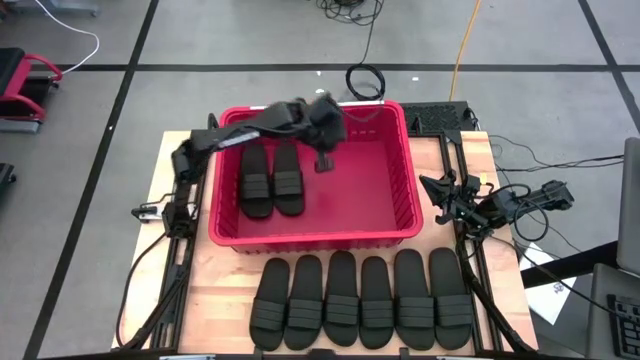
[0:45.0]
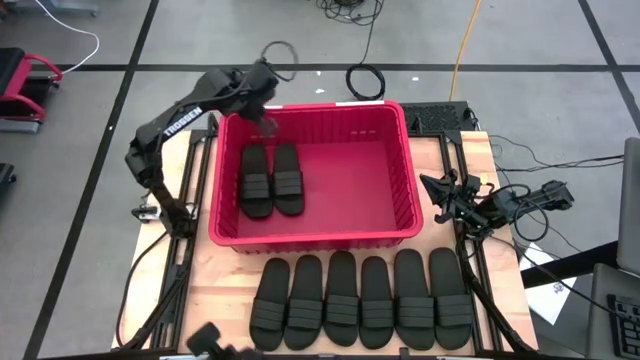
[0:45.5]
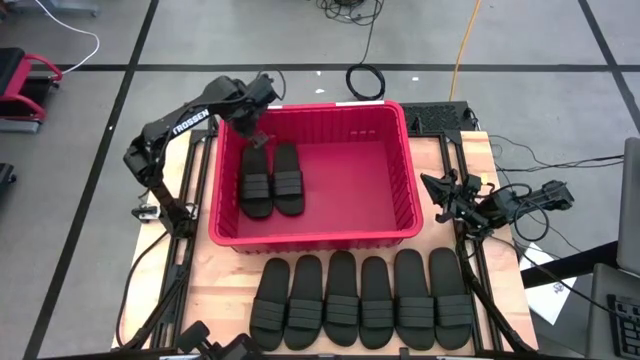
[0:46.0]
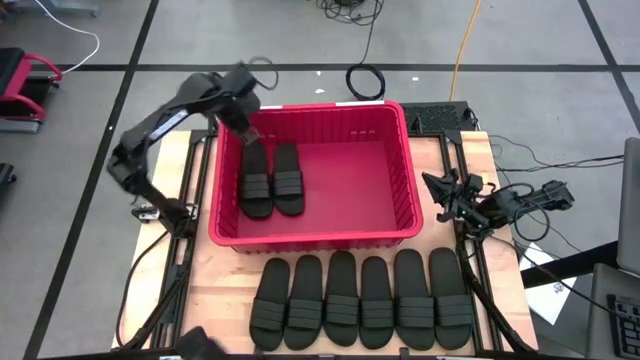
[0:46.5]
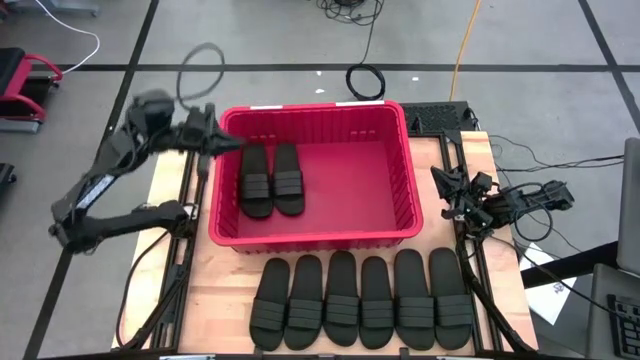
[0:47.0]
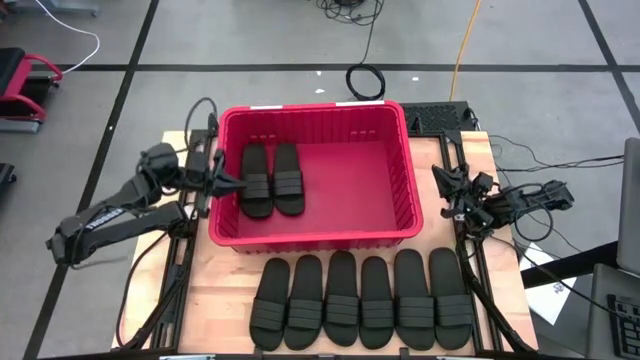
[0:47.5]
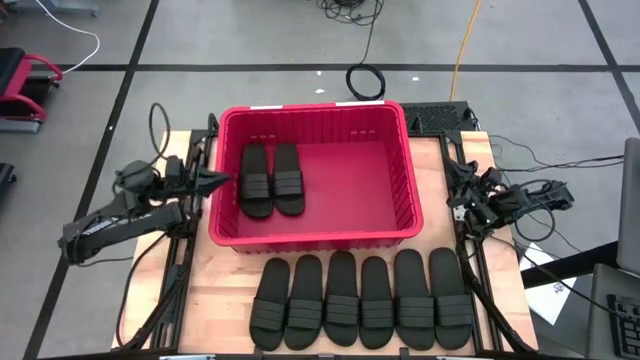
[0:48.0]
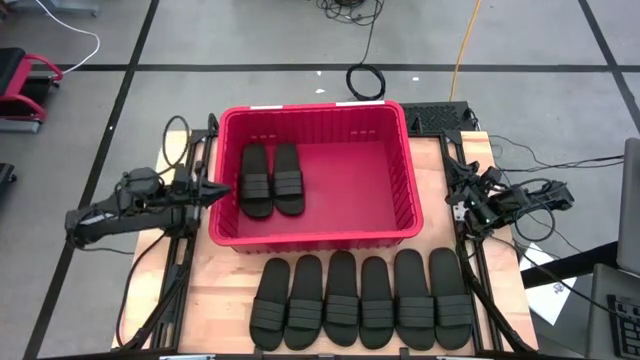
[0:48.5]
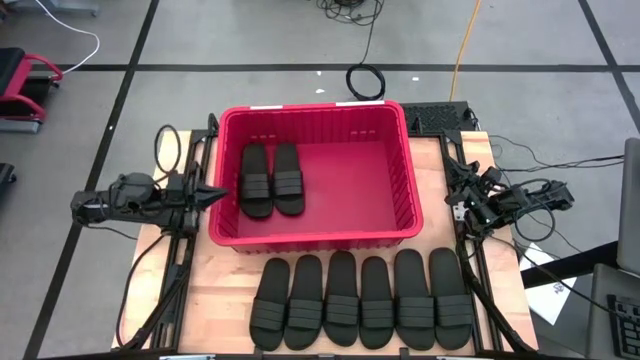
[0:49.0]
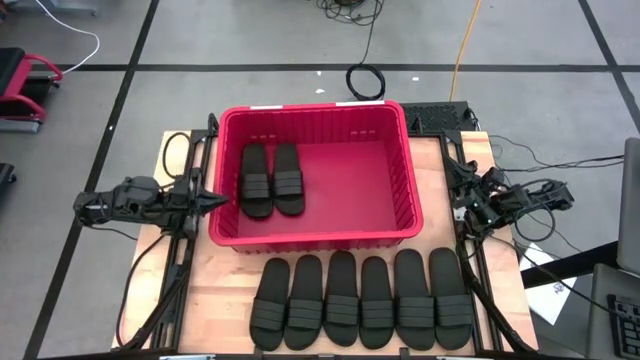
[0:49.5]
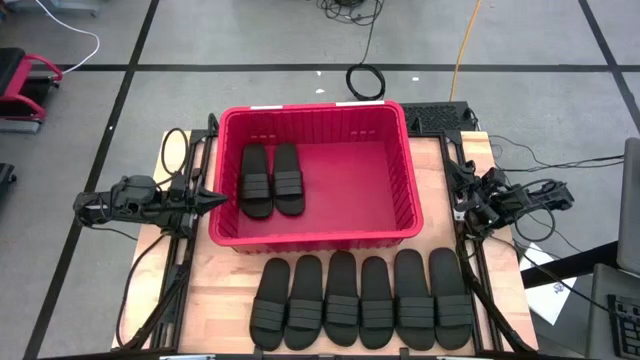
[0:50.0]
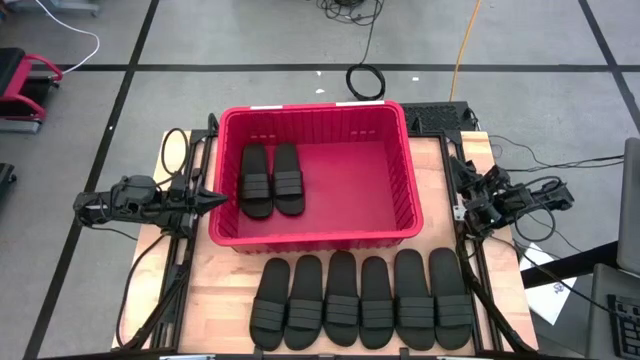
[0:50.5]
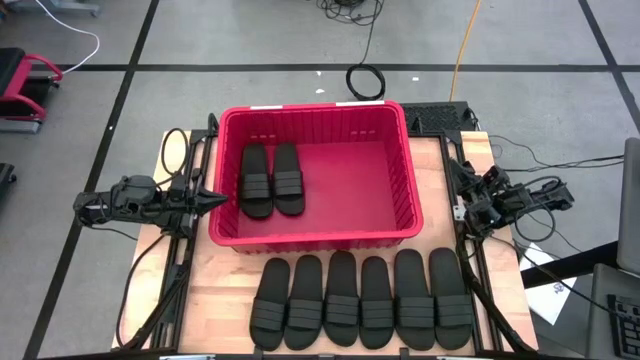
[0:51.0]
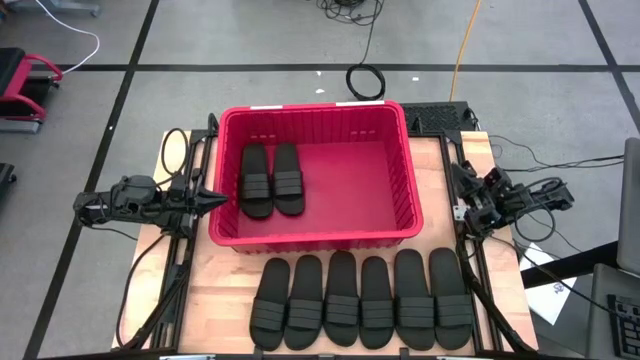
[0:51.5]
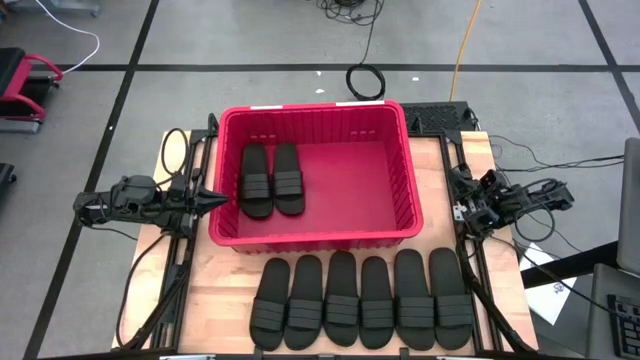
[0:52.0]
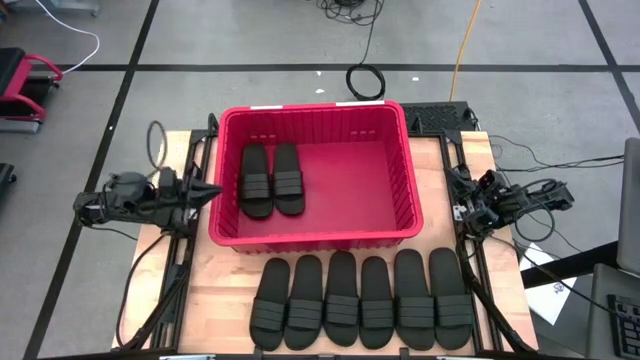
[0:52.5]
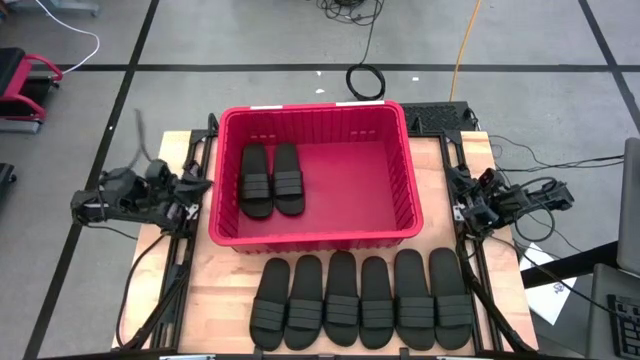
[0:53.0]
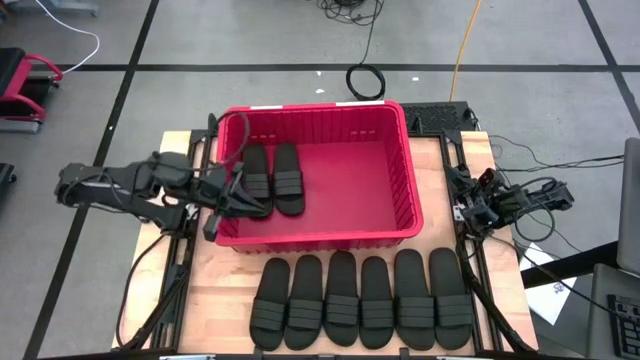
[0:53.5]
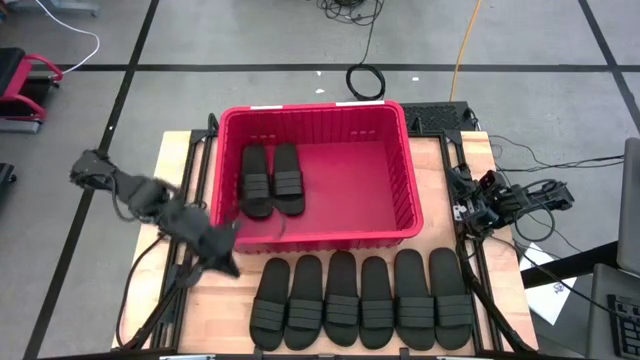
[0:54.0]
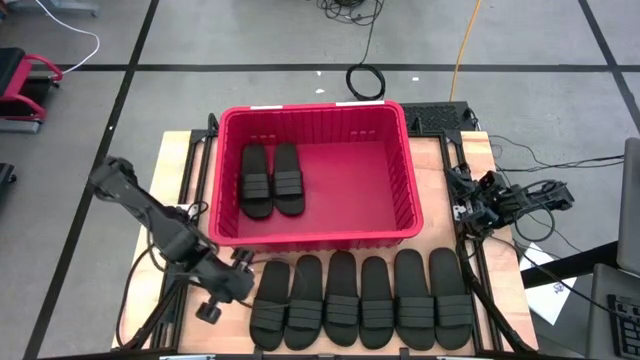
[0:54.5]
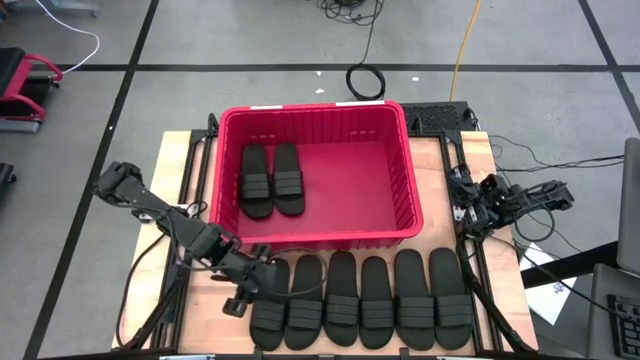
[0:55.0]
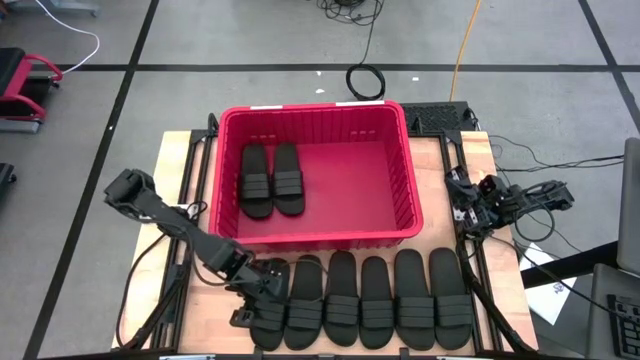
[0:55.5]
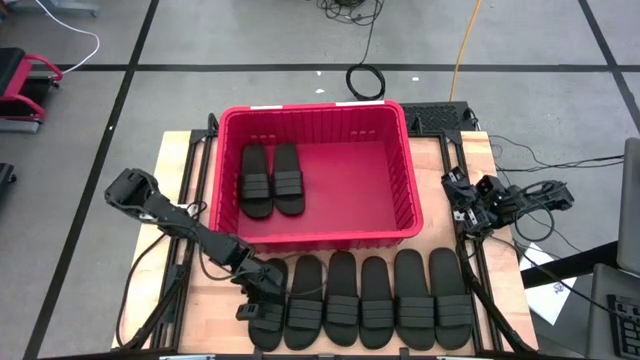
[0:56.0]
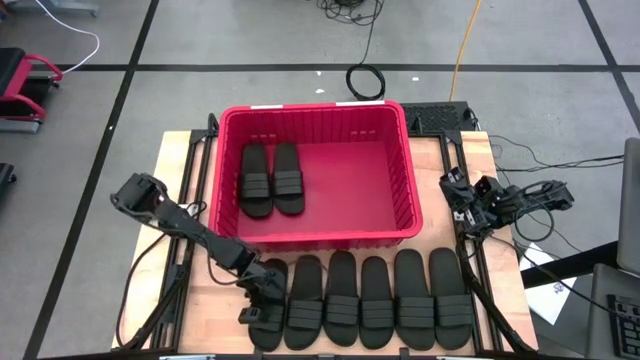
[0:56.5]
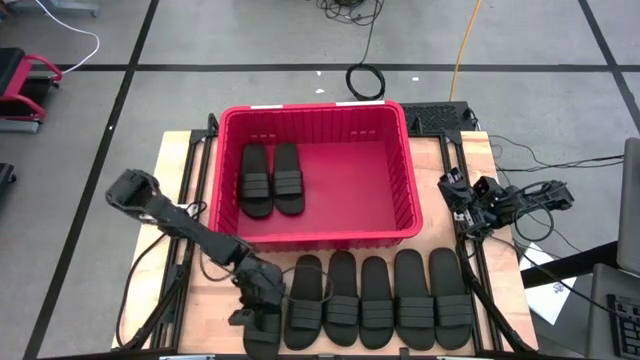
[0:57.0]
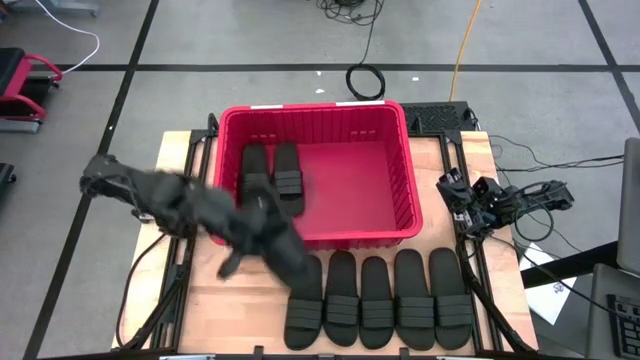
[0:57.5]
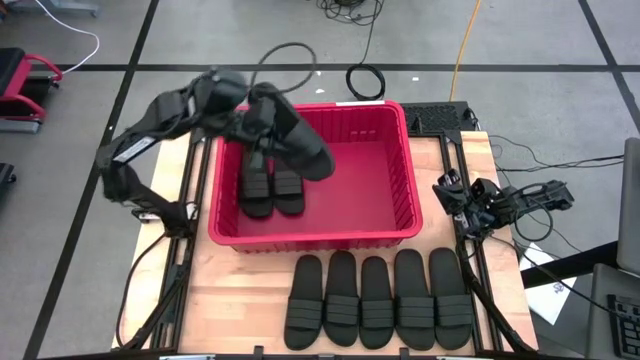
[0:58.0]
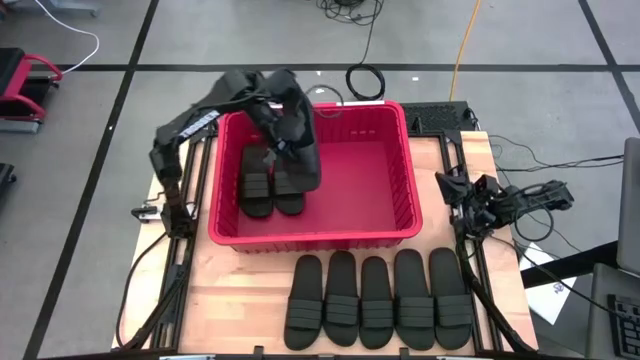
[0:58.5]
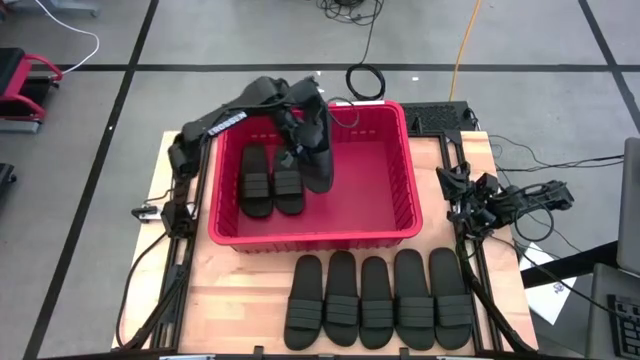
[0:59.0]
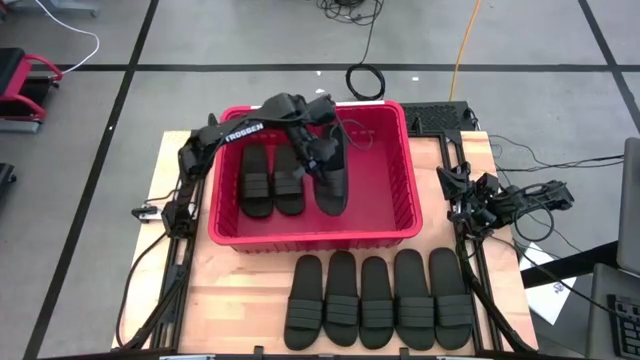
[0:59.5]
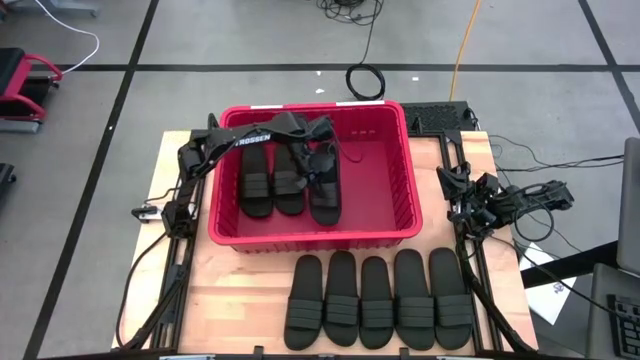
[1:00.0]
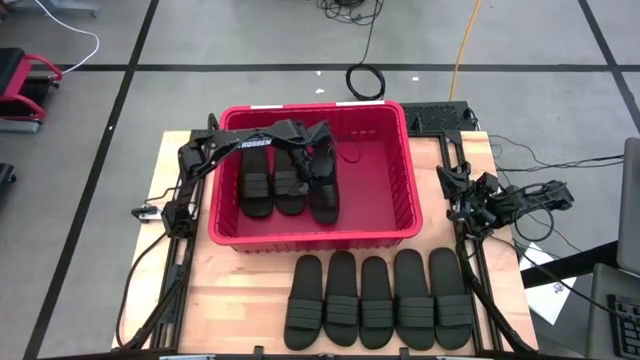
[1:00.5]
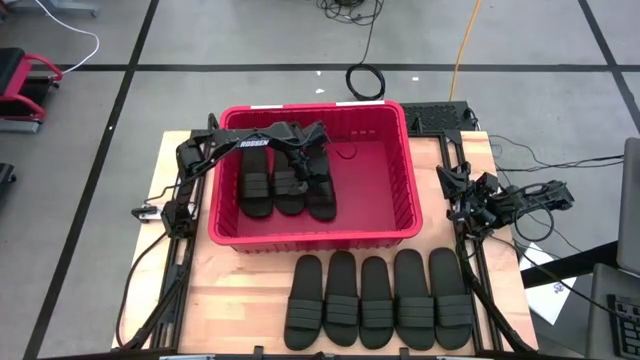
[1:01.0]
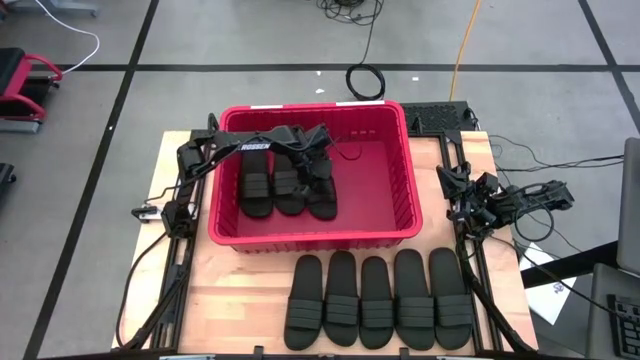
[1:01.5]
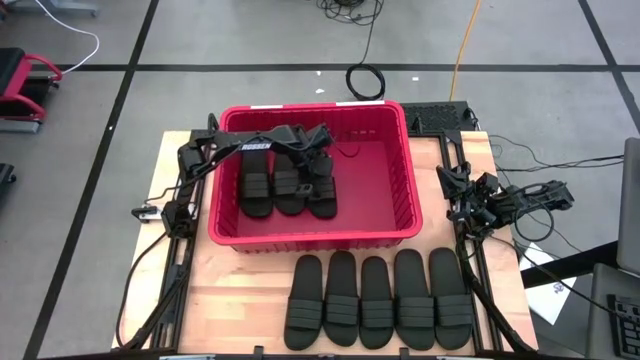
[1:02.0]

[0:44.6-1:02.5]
Task: Pick and place slides into bin
Put the slipper into the bin

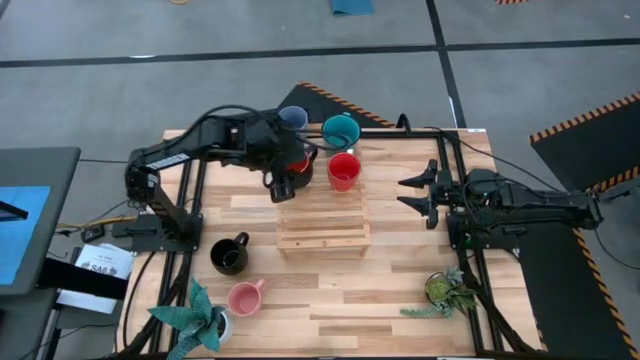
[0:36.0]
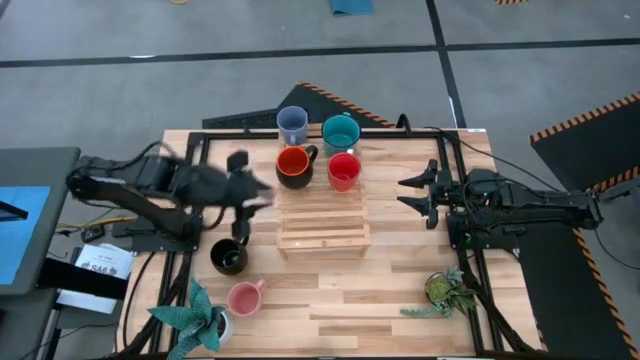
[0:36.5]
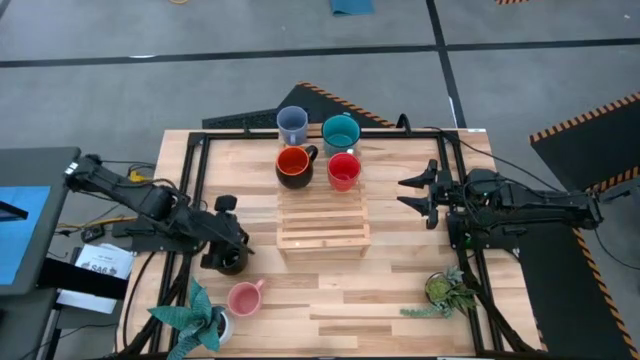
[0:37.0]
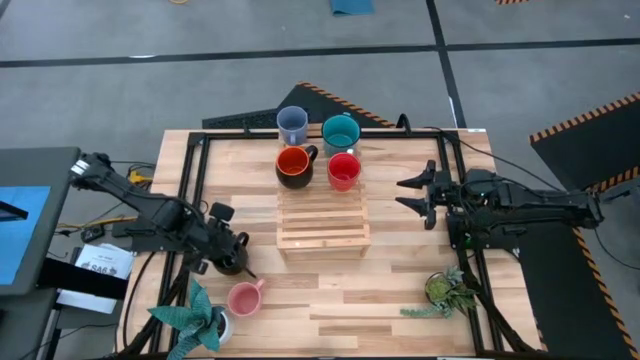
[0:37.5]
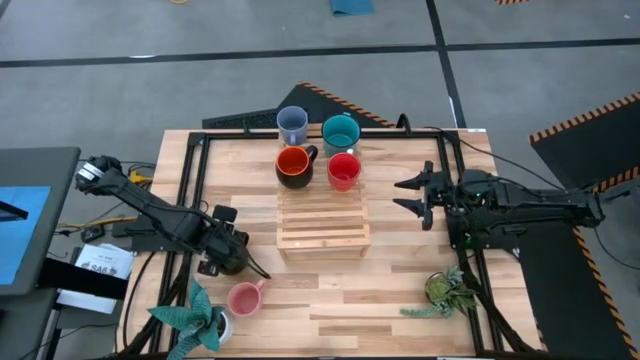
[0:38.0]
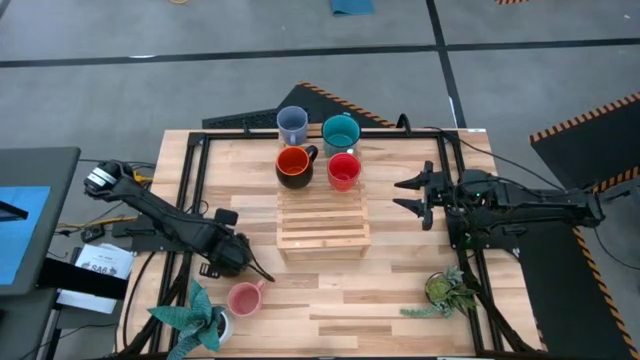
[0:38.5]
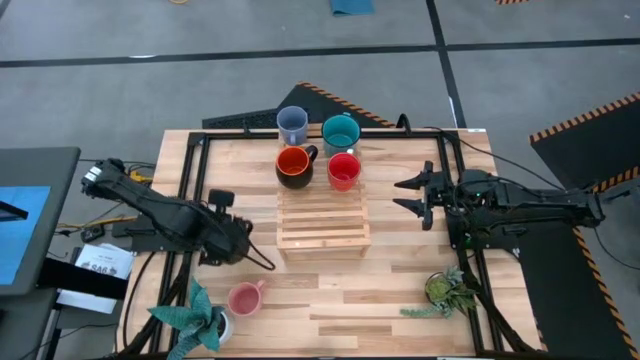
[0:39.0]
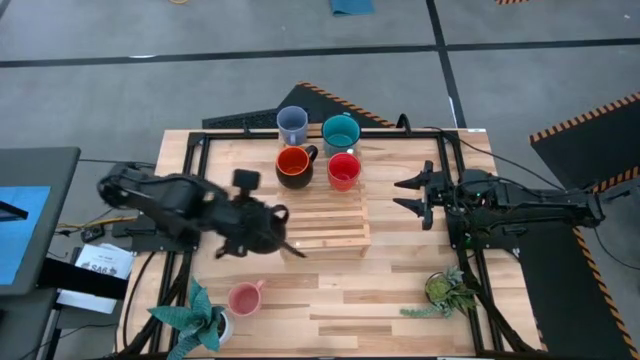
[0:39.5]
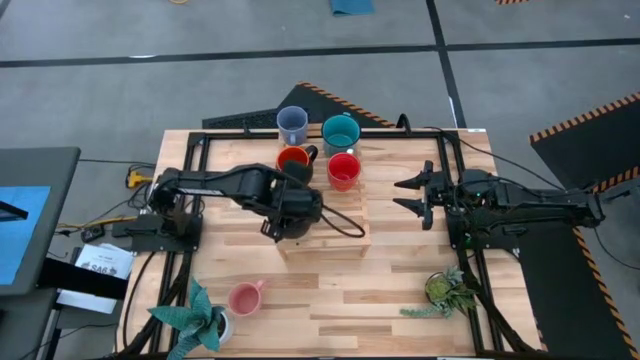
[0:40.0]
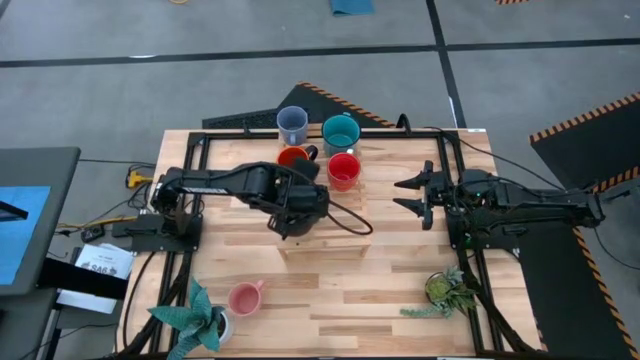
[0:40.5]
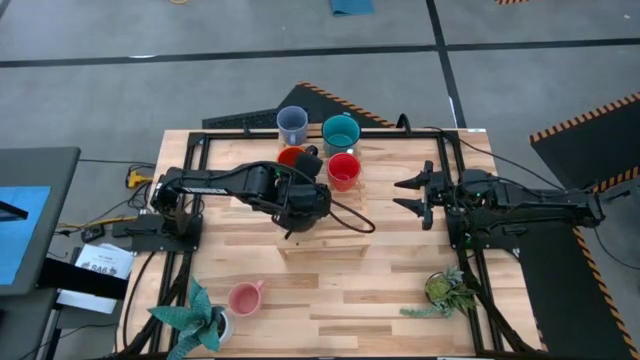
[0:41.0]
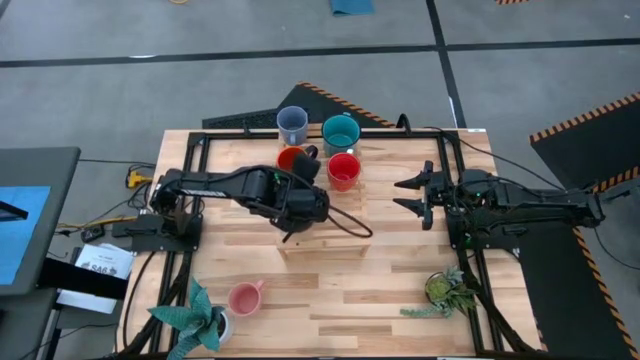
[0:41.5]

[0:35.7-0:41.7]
Task: Place coffee mugs
Put the black mug on the shelf aligned with the orange mug
